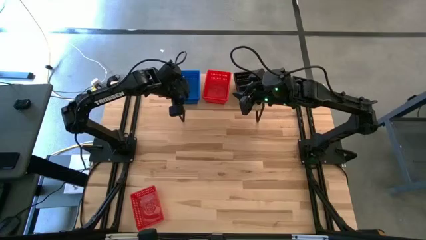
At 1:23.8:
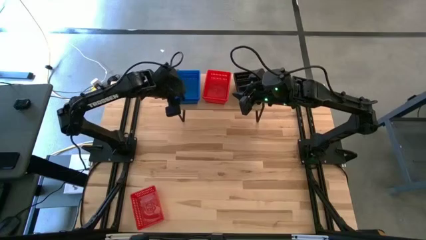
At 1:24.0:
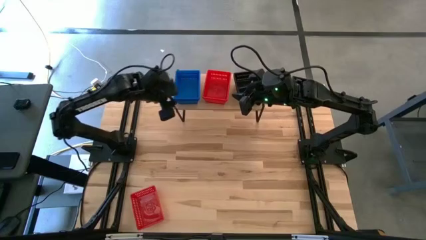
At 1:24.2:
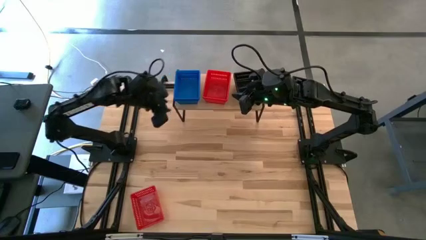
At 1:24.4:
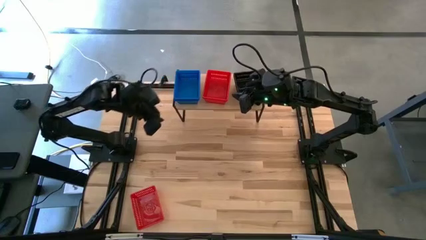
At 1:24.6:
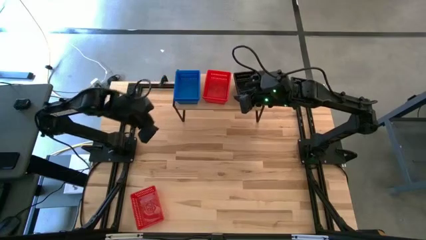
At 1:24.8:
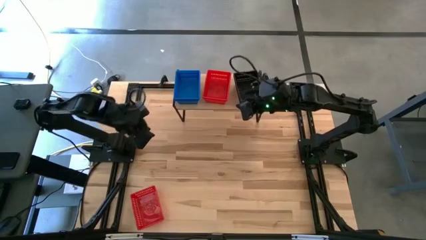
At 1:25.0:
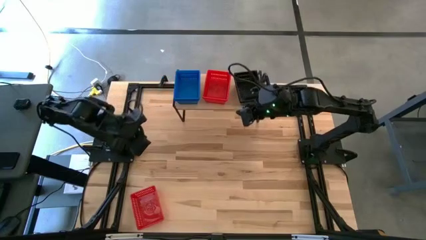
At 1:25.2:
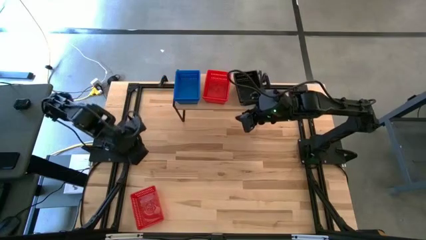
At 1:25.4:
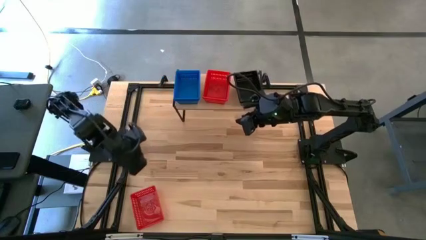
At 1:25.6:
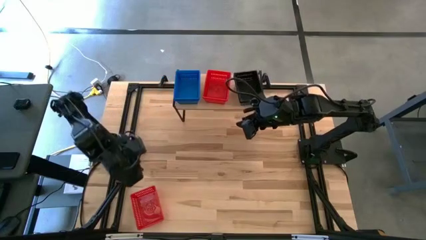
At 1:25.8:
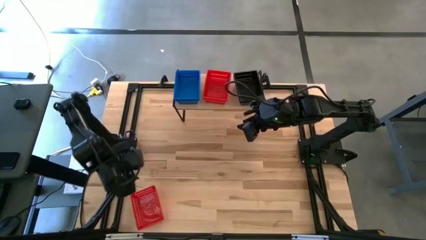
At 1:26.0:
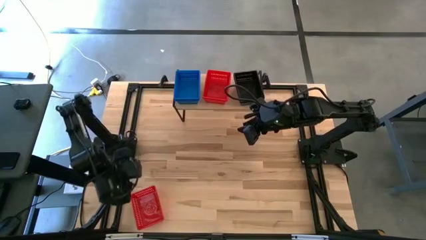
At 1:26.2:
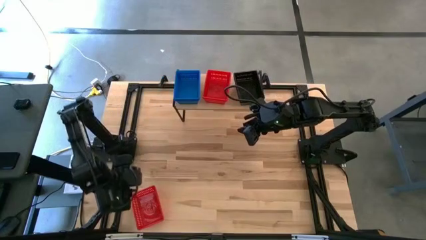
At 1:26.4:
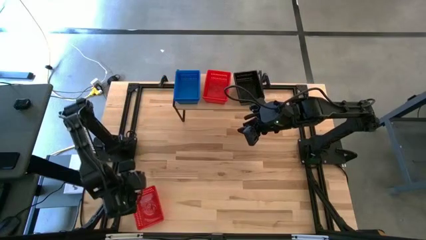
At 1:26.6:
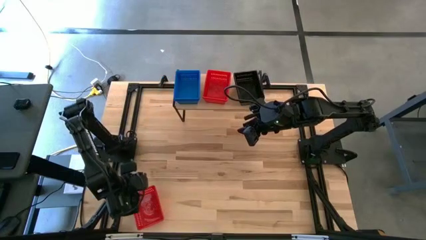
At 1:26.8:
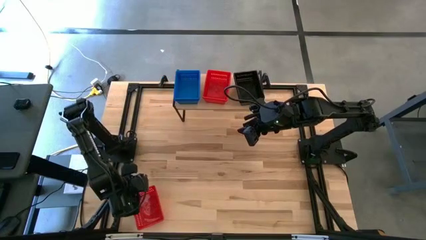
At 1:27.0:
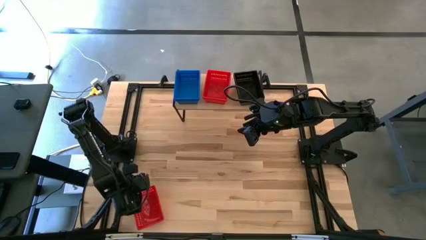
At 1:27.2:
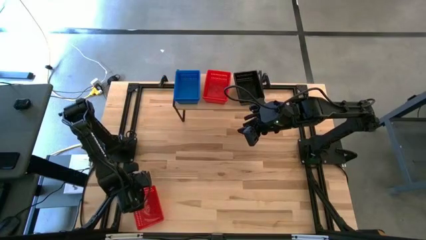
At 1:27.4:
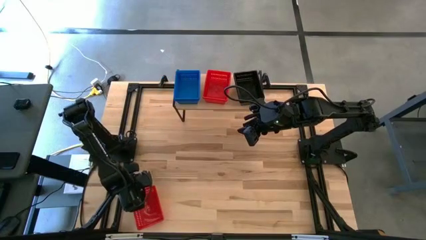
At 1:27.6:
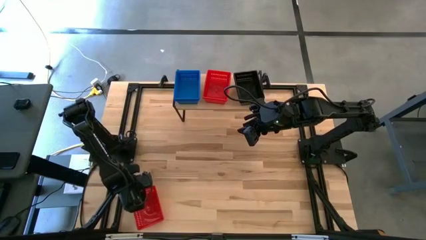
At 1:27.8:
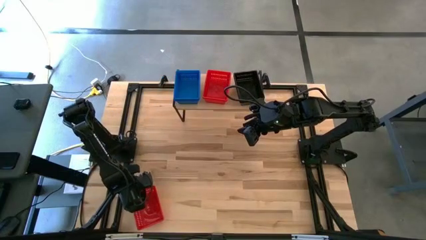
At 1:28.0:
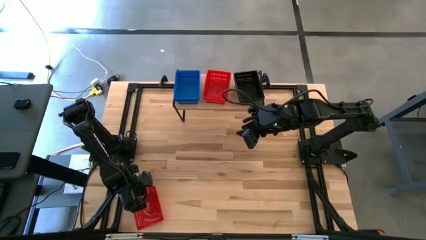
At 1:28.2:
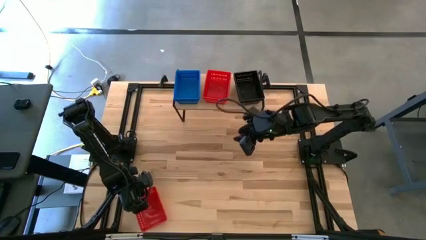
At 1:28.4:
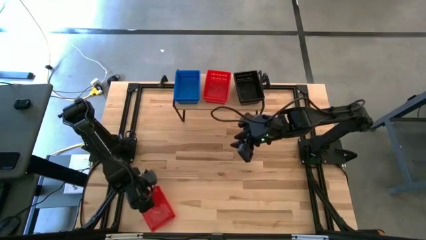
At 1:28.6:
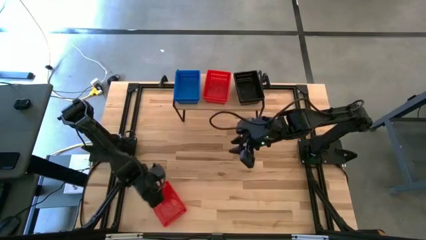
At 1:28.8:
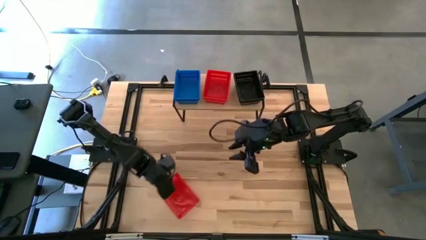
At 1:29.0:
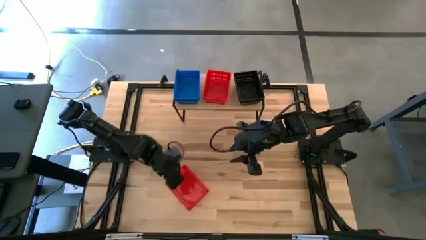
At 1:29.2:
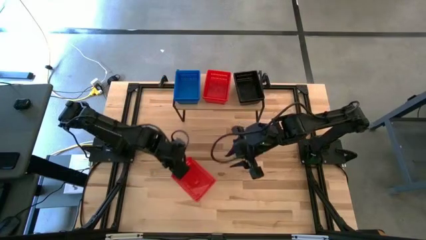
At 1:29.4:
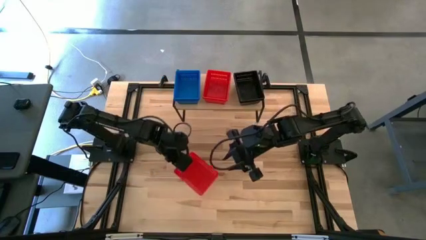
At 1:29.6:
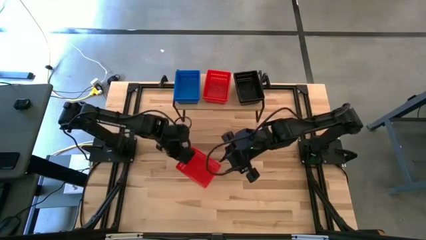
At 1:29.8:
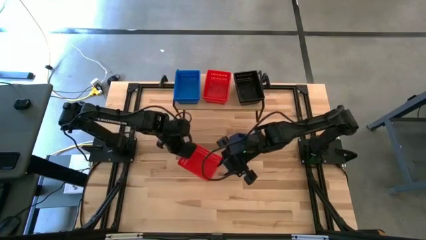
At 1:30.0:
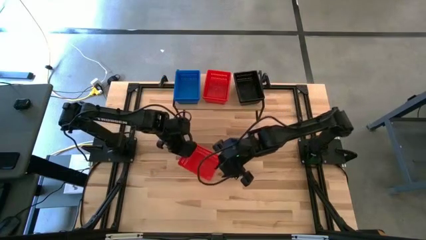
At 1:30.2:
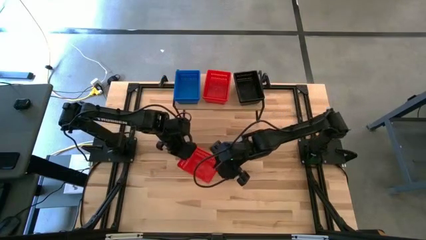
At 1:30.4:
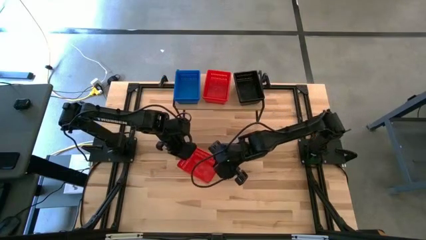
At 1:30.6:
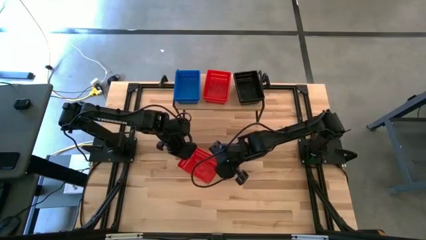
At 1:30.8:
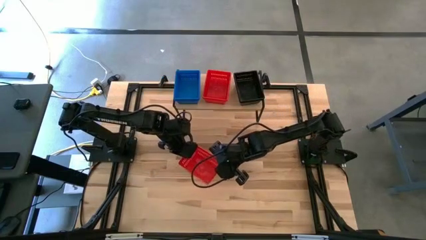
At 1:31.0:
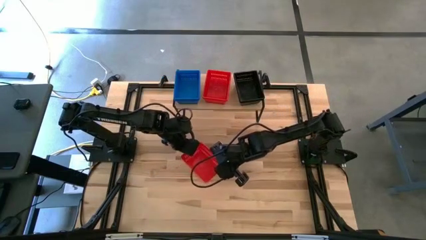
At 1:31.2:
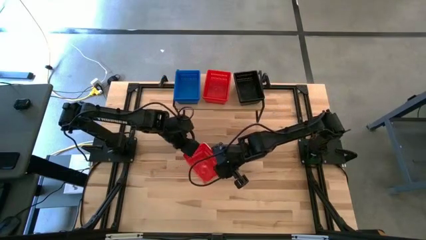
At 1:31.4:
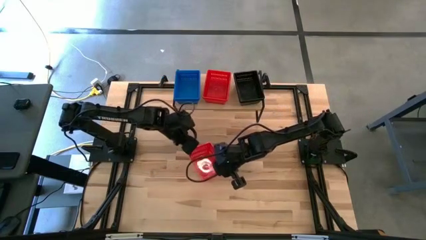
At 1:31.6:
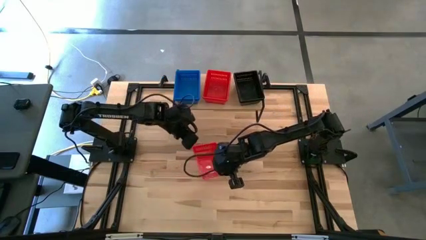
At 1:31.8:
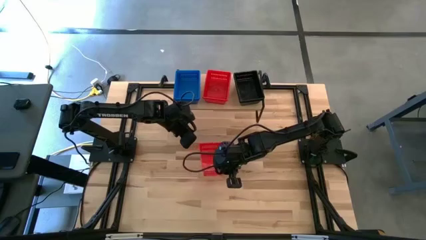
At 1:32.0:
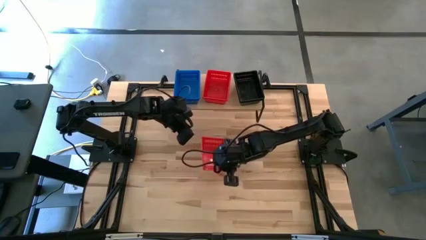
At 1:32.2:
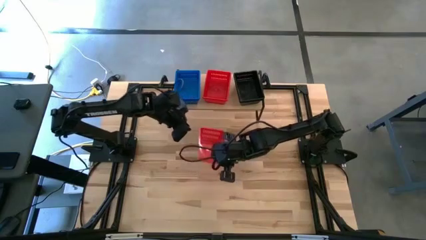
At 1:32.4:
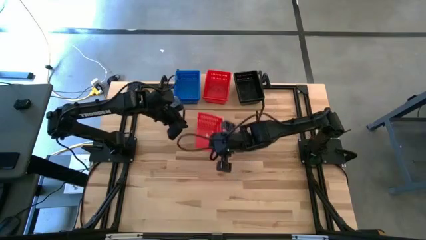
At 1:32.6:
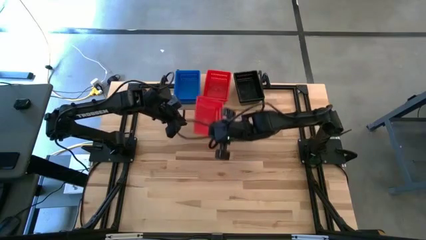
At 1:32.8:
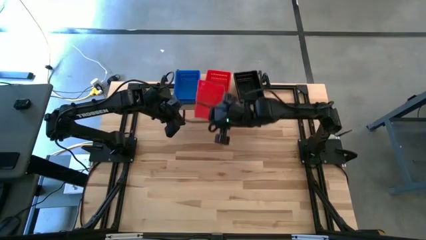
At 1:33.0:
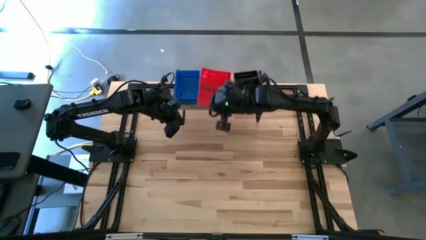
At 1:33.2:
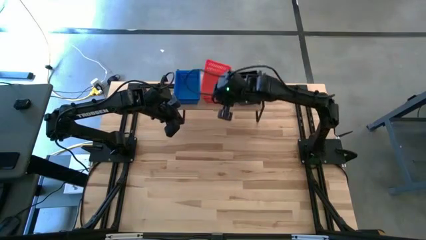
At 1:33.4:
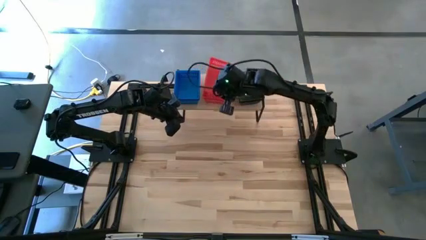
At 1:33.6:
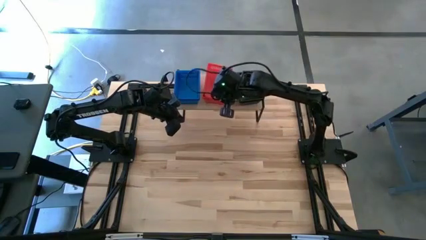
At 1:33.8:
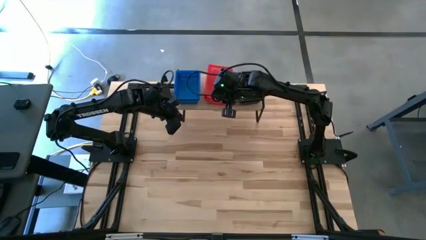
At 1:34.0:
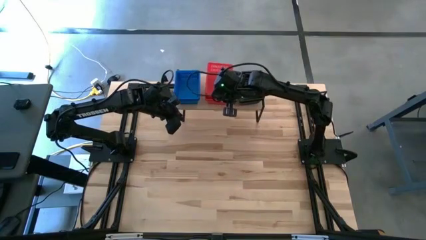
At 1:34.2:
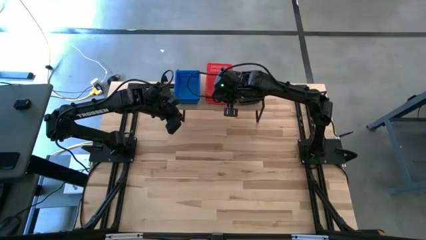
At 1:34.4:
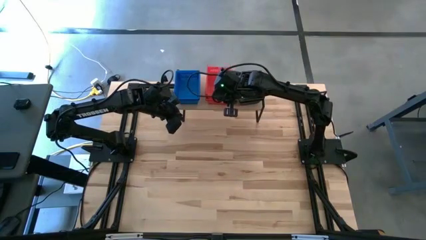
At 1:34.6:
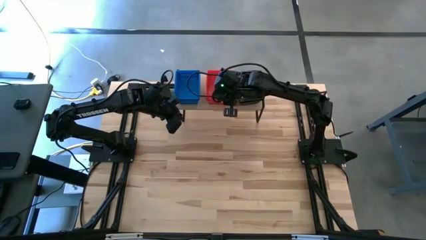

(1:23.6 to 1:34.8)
Task: Stack baskets on shelf by color
Stack the red bin on top of the other red bins on the shelf

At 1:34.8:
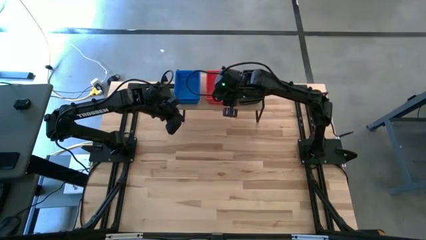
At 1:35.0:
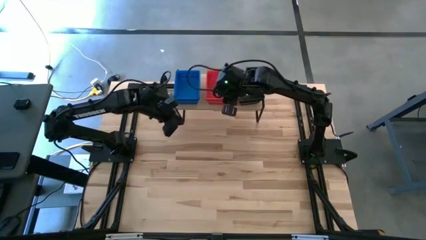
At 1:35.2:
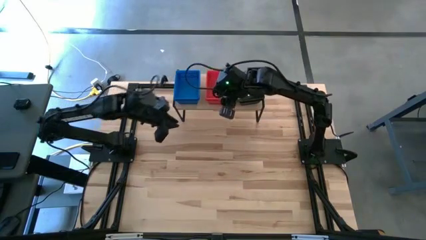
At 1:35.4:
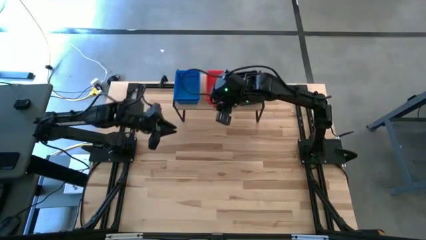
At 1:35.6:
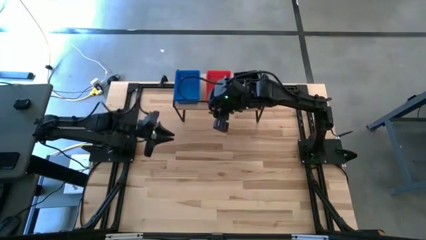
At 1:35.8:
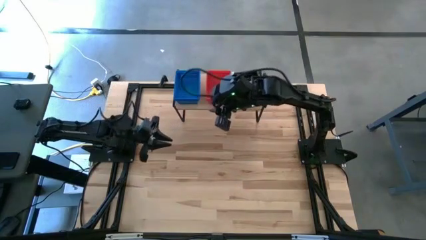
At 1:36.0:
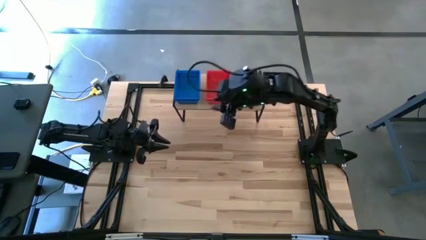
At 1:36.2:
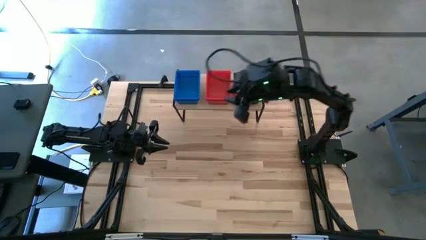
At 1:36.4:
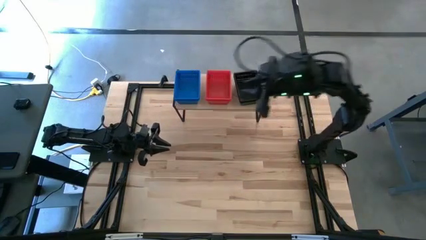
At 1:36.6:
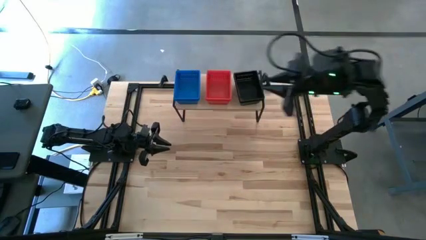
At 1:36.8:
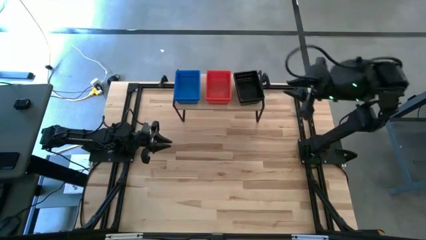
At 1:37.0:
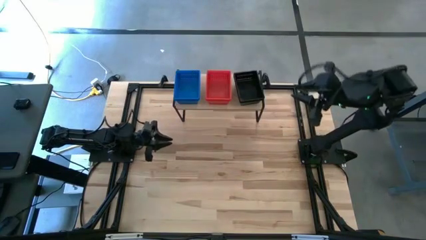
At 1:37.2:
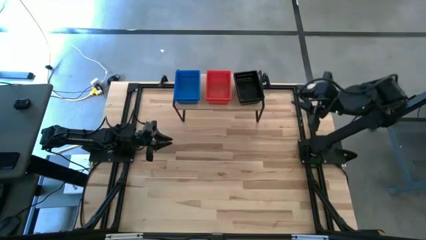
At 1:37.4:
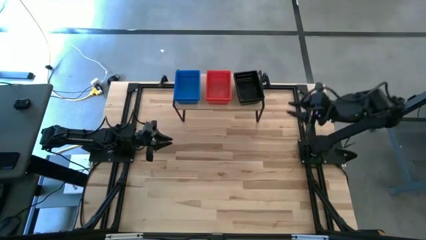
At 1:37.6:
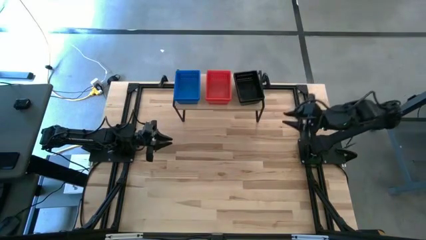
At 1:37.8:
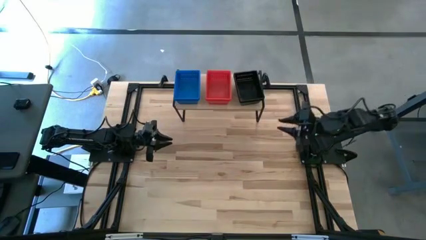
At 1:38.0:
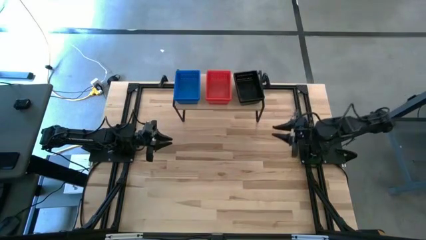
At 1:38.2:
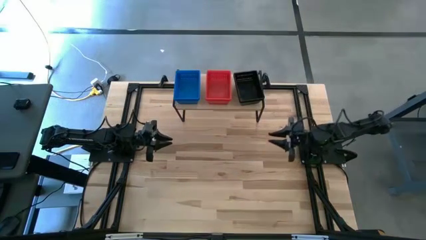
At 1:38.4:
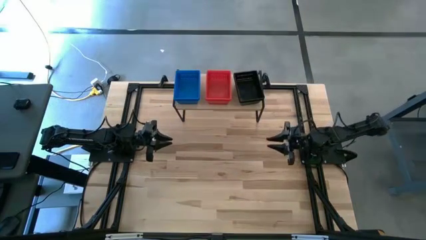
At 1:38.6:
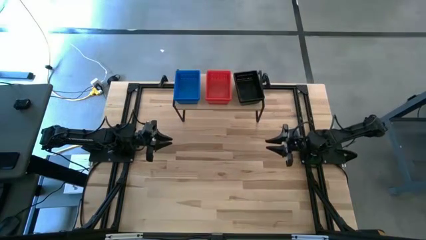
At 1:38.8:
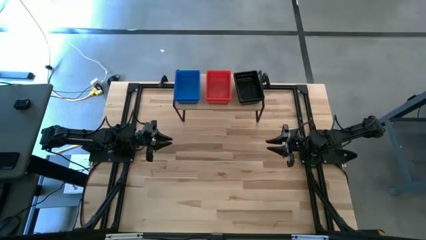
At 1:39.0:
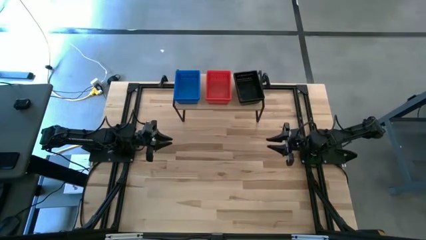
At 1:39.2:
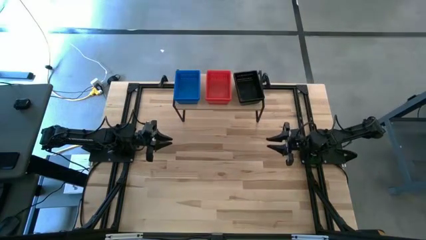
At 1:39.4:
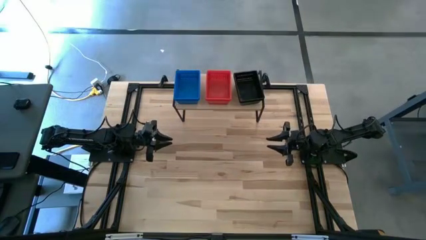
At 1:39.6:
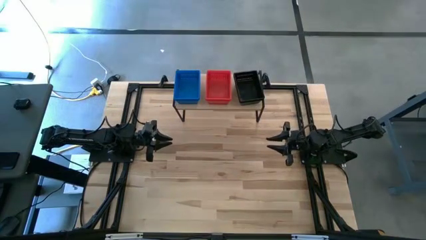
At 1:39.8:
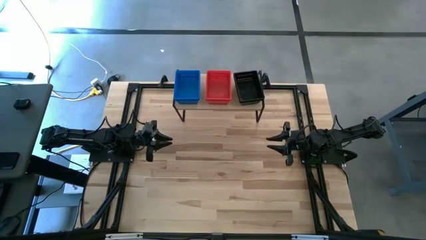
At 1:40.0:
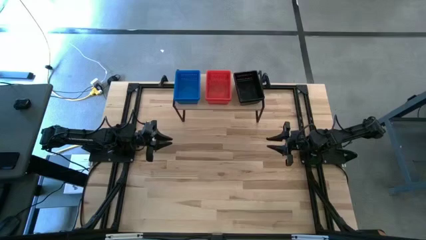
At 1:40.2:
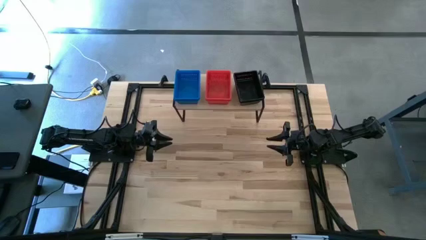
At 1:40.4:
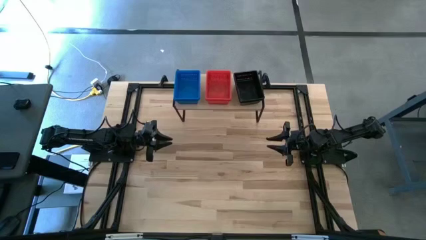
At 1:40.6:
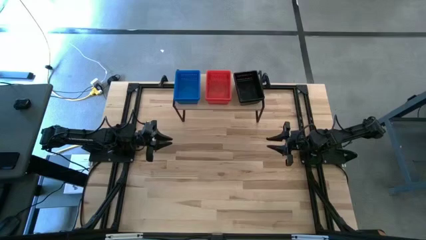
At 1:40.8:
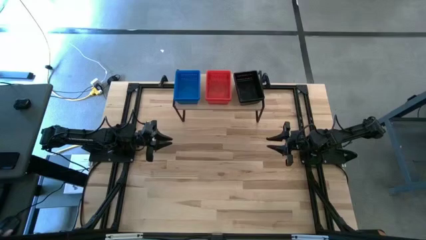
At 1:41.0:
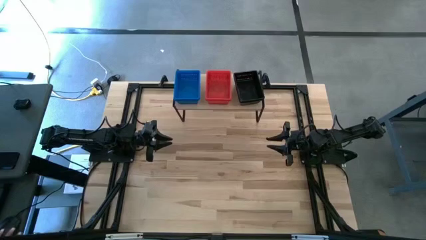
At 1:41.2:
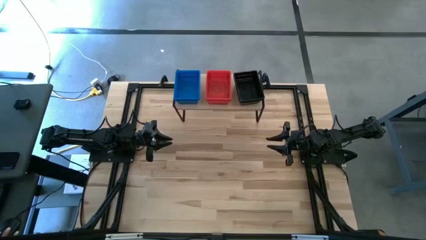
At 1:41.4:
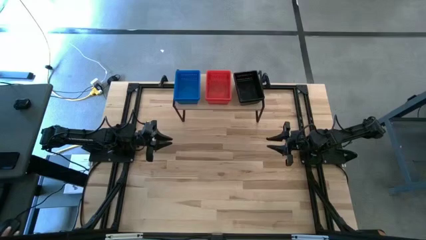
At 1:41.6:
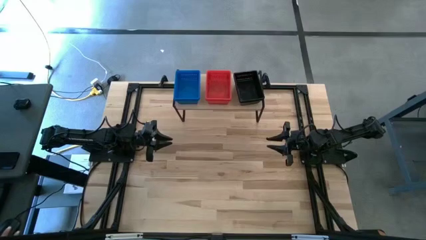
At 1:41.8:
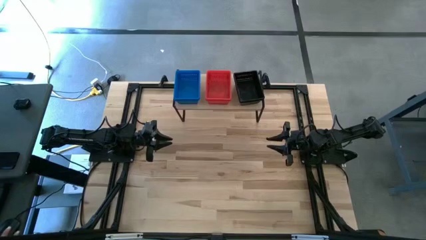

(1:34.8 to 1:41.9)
Return to Home Position
